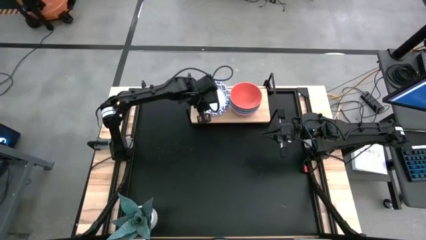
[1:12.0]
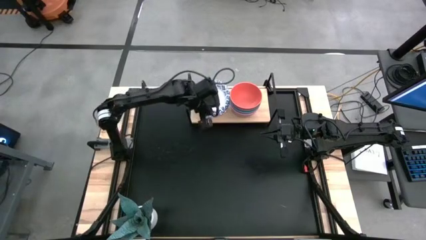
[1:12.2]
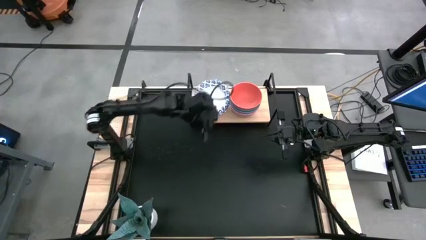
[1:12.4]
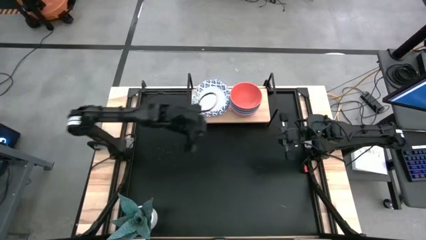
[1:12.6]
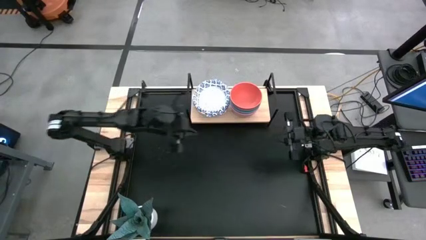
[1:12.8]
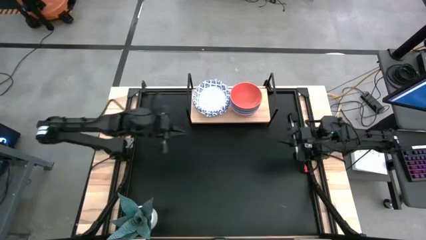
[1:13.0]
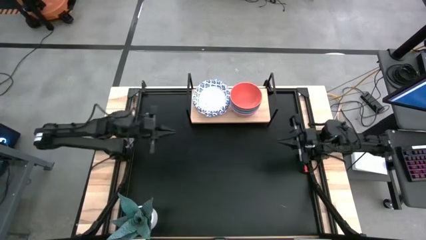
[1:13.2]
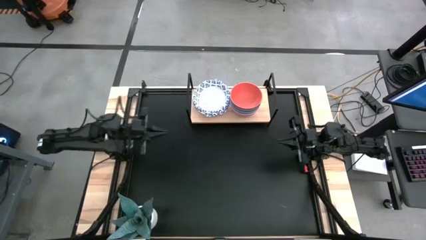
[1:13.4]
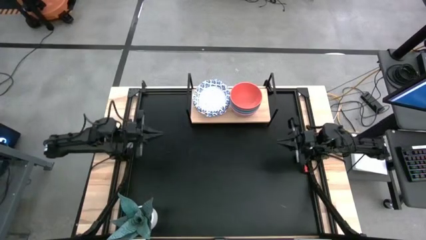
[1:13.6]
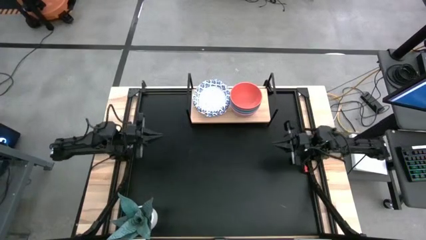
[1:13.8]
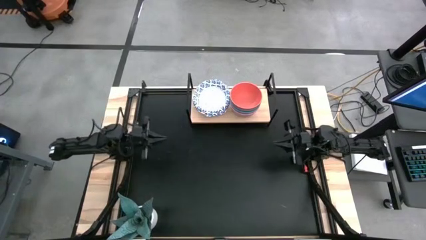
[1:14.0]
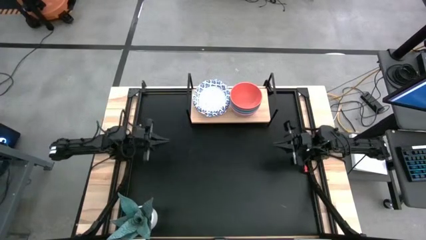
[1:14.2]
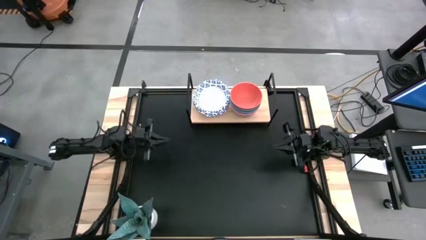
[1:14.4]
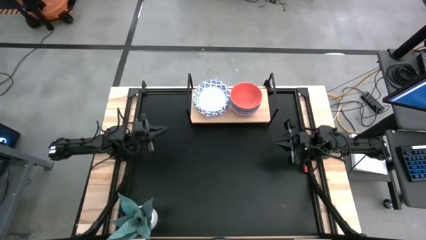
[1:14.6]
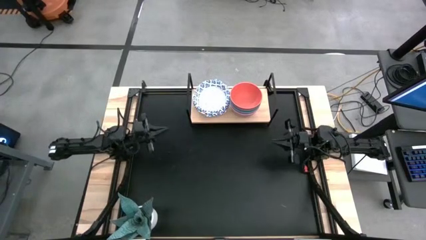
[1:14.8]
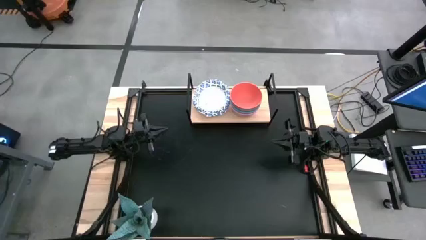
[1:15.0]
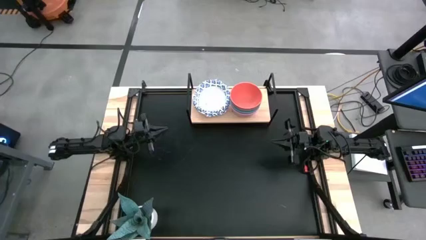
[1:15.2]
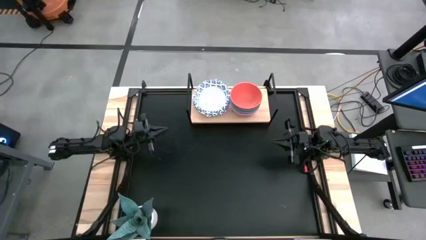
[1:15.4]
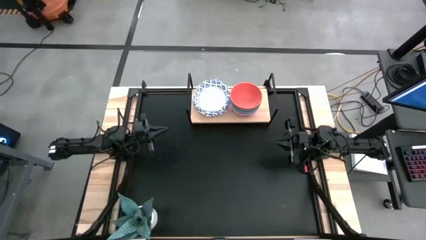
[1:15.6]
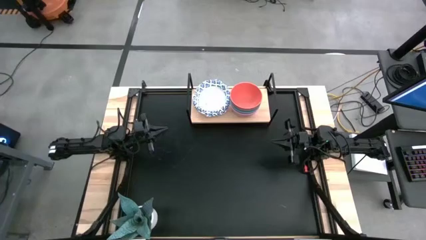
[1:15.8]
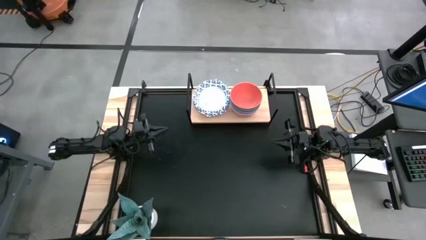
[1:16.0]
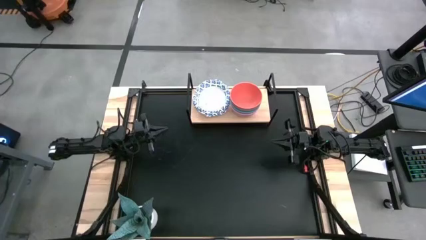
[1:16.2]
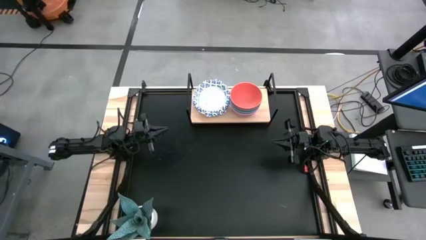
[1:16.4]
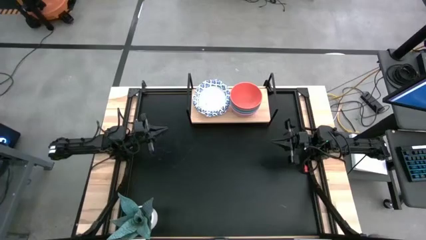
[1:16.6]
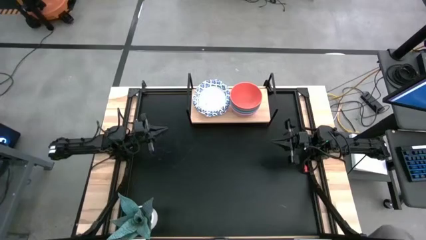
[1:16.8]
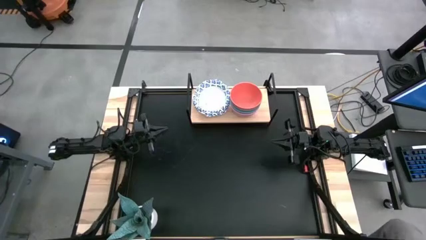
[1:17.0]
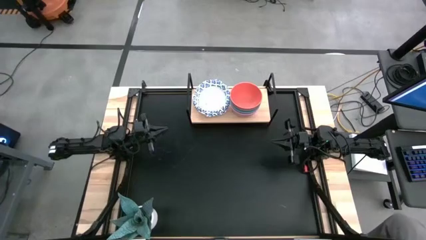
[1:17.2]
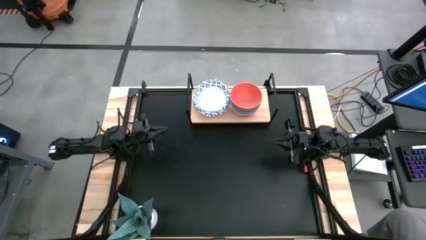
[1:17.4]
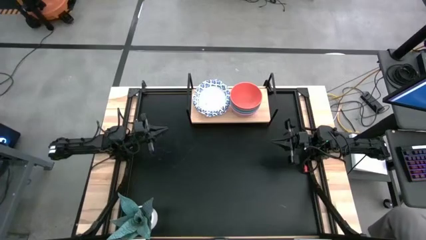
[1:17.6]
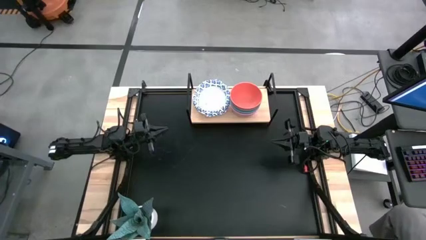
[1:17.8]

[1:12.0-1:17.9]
Task: Place and stack bowls onto a shelf
Return to Home Position

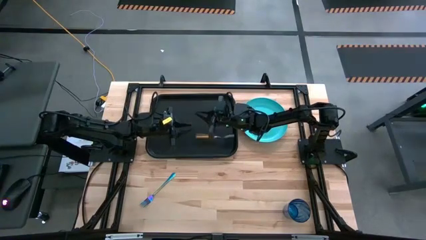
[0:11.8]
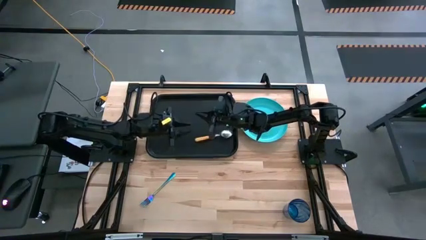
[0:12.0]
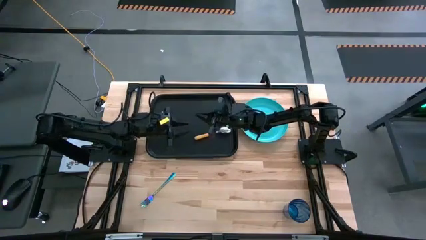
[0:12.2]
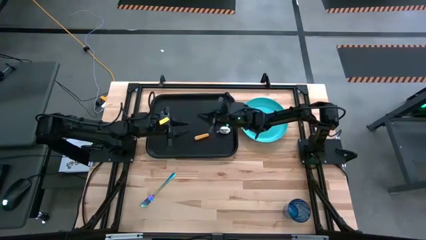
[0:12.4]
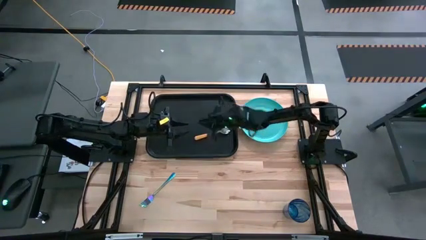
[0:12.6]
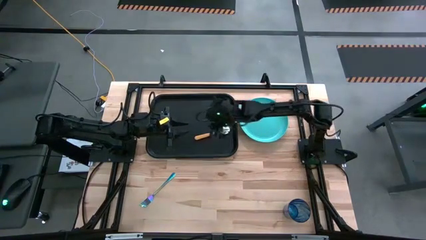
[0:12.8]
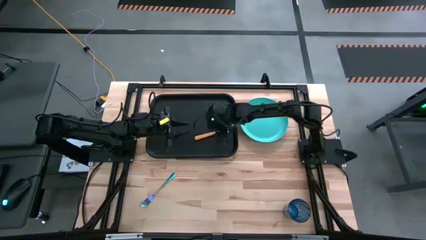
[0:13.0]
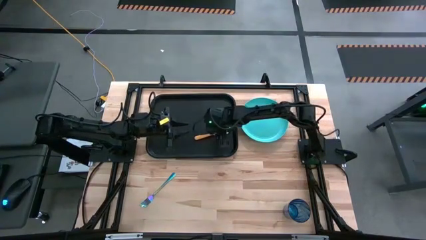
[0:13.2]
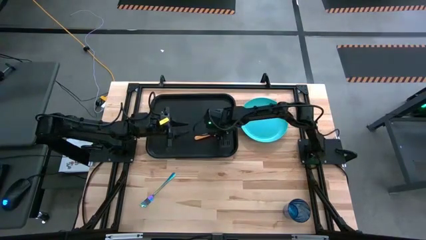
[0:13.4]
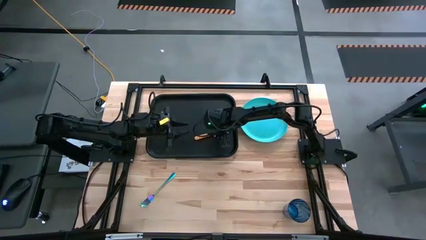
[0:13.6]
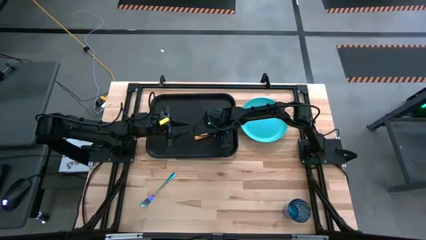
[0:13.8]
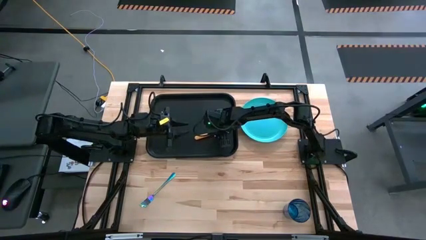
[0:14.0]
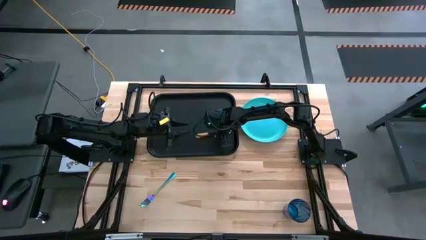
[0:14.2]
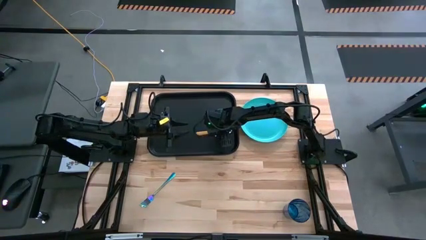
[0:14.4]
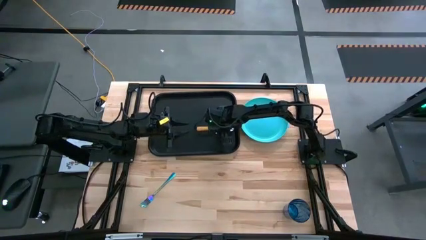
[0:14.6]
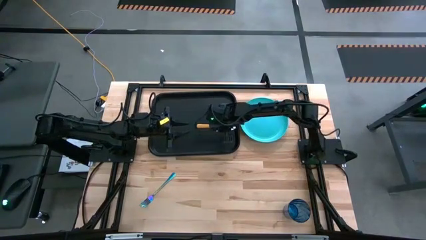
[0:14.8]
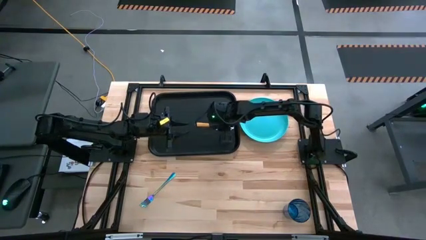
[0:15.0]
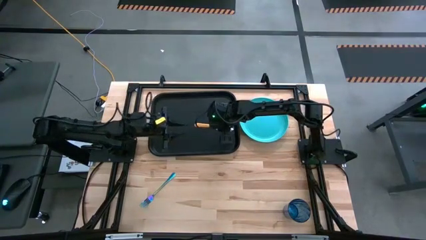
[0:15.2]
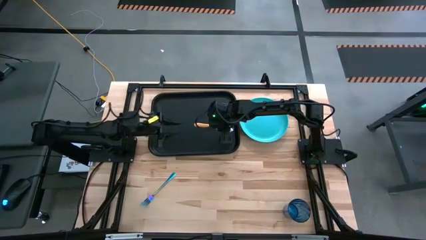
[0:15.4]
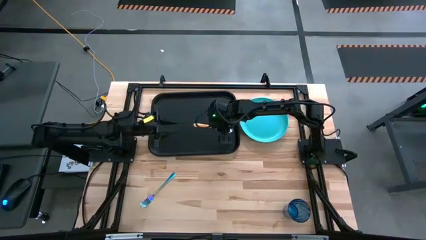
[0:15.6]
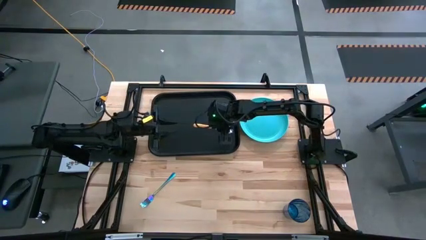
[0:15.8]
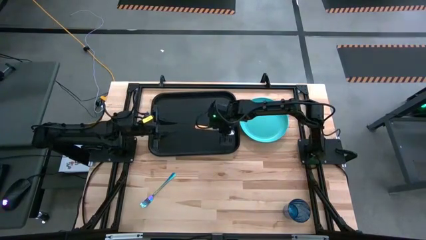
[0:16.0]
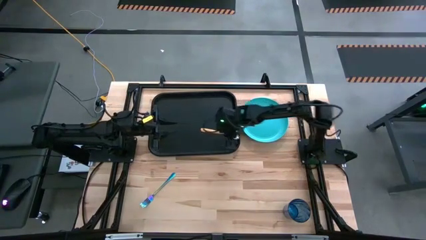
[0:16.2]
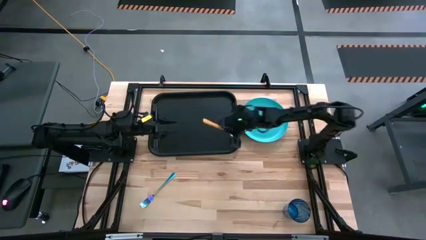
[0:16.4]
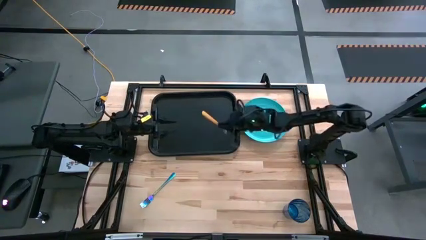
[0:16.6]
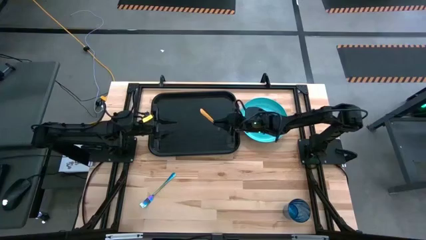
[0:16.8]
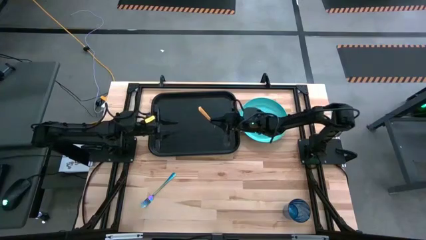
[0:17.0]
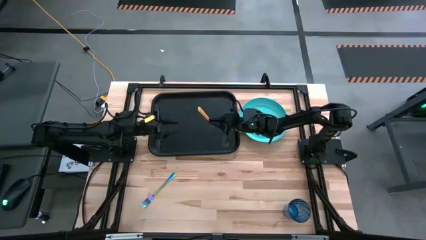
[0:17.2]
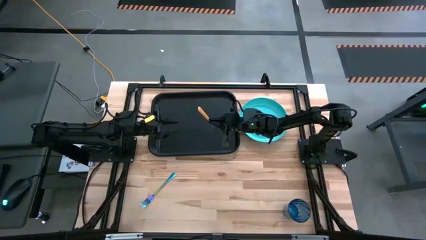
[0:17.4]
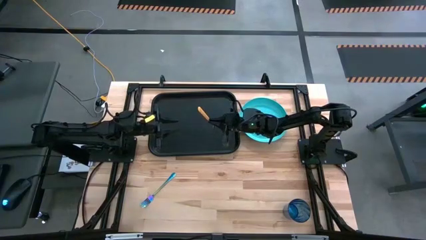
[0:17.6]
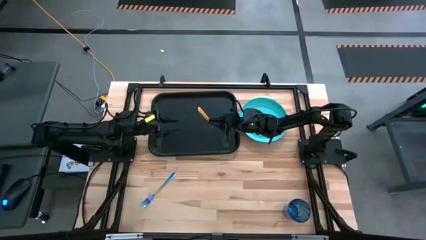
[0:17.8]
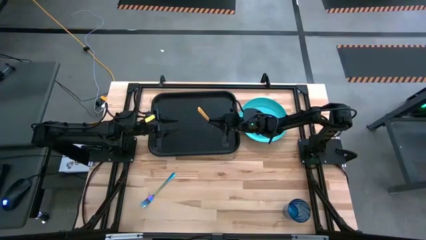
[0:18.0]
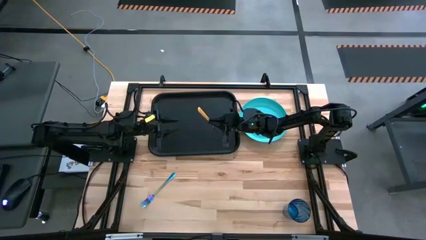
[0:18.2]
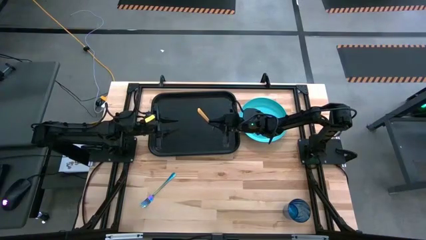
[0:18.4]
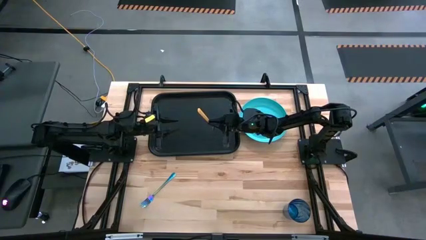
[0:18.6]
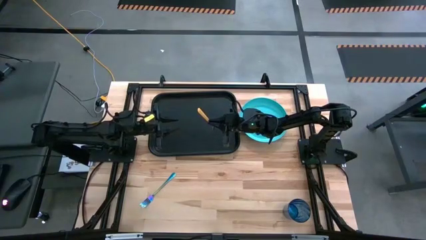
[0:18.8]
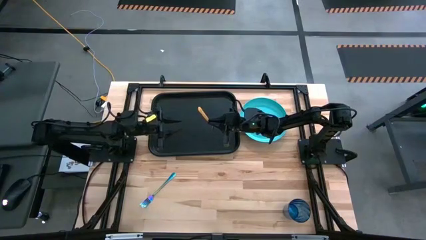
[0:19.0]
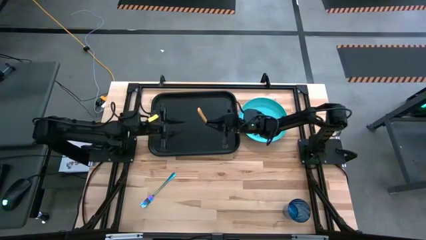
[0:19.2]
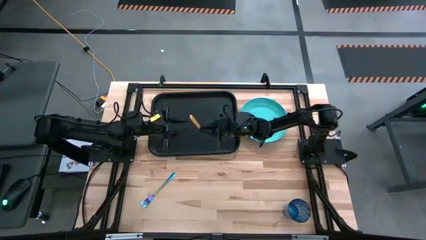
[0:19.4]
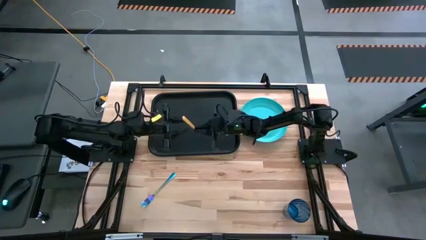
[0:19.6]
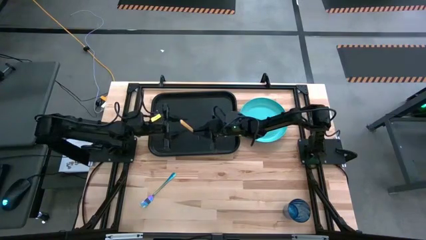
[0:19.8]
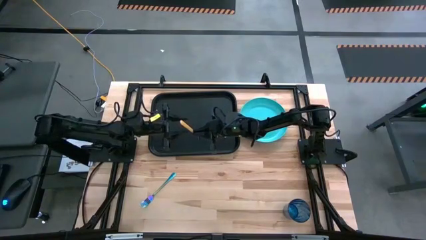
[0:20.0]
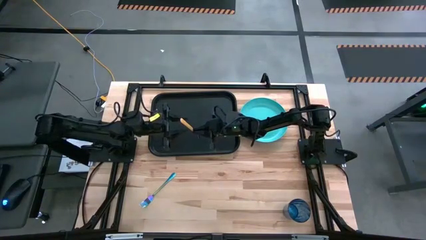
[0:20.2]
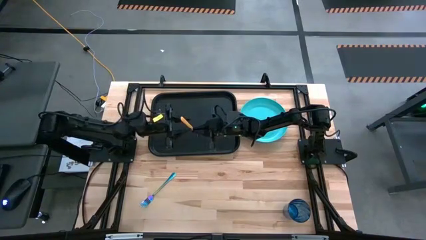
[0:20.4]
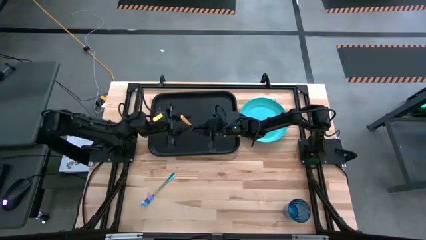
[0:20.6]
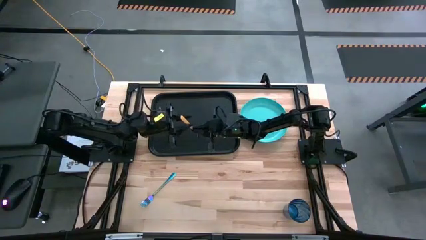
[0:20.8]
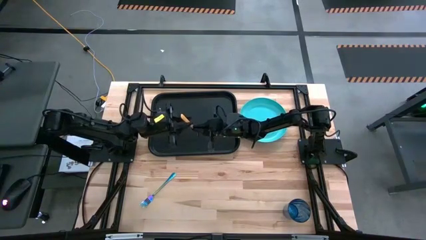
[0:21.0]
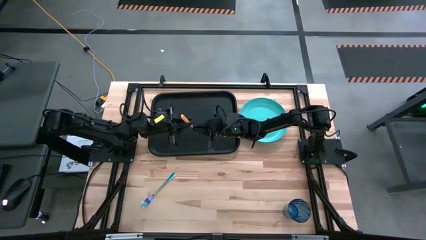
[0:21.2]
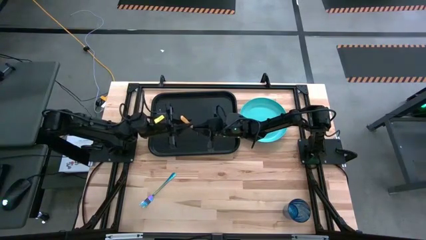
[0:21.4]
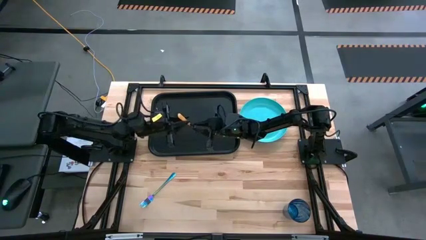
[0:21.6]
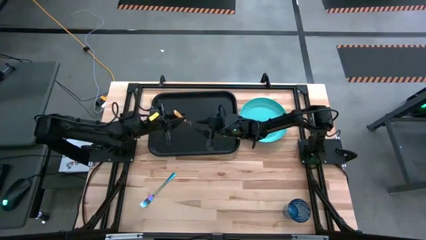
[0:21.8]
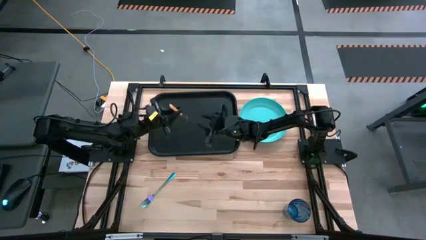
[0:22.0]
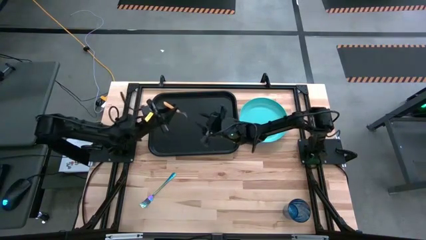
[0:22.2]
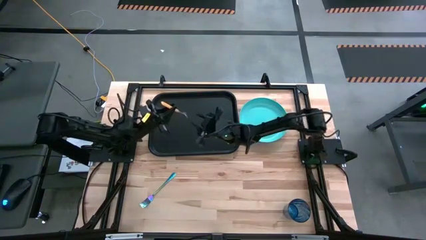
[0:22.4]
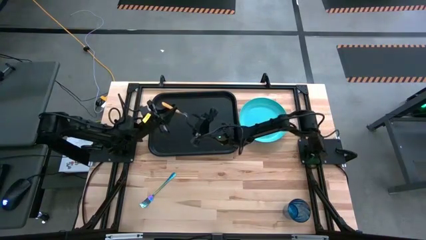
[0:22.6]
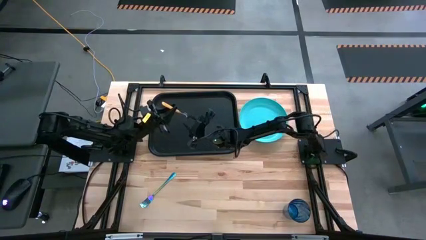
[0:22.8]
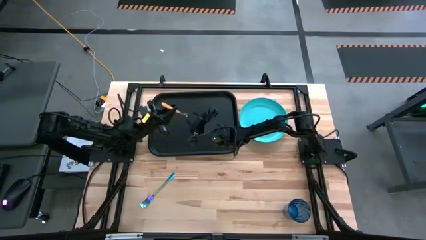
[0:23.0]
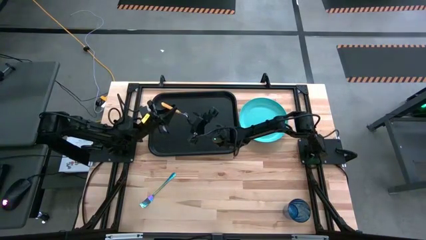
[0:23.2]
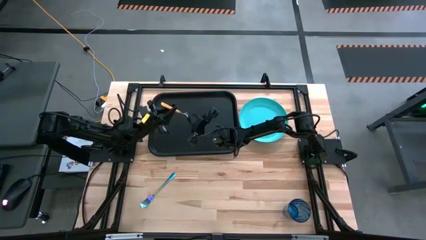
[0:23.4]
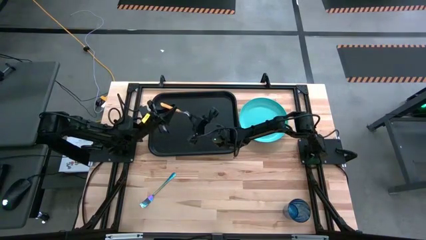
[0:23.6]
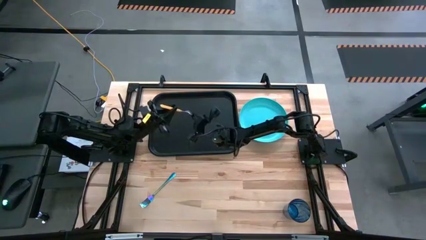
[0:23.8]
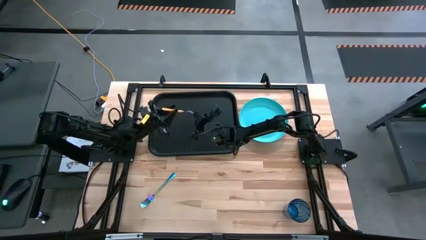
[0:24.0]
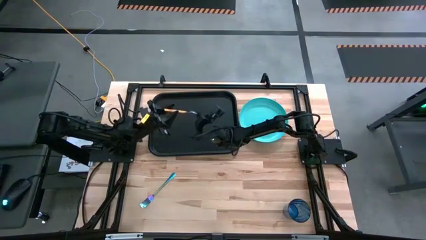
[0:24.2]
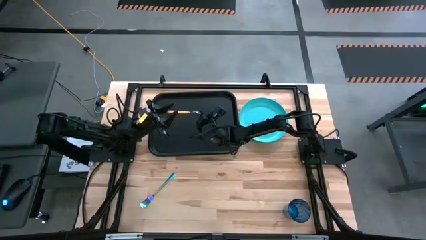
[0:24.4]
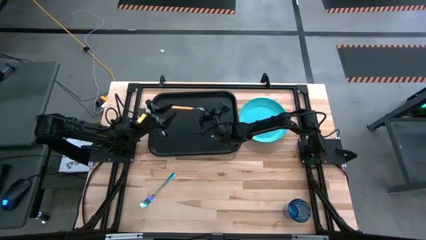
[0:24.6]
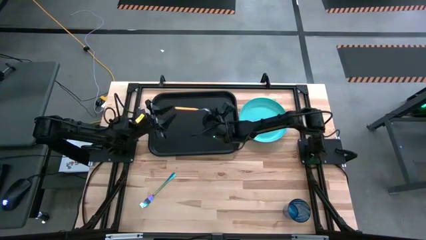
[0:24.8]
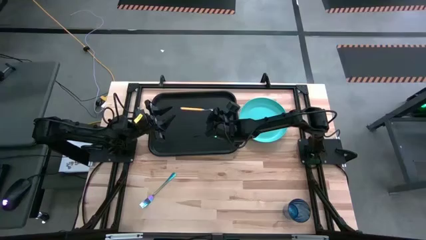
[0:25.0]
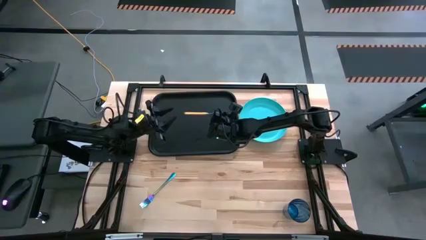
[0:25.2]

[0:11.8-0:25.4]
Task: Pick and place plate/cup/fork/spoon on tray
Put the yellow spoon on the black serving tray
